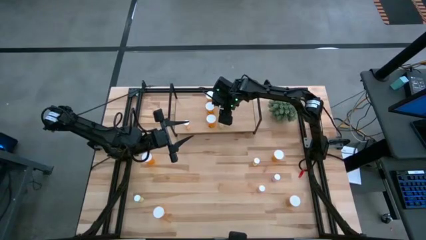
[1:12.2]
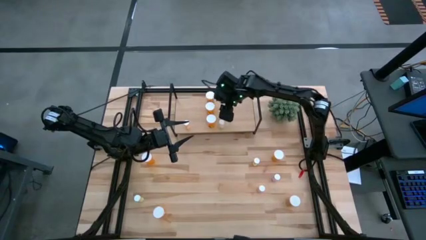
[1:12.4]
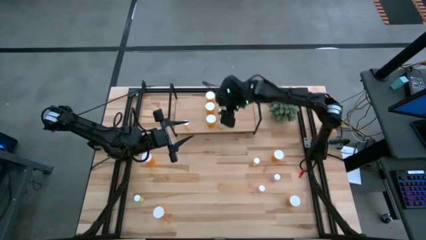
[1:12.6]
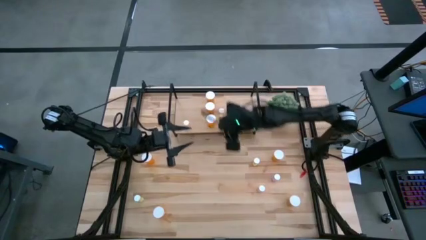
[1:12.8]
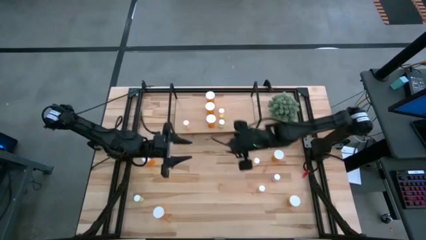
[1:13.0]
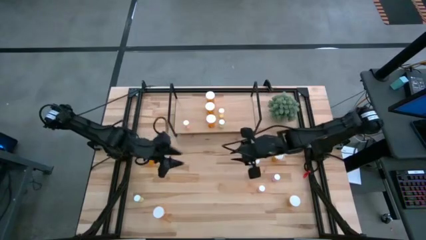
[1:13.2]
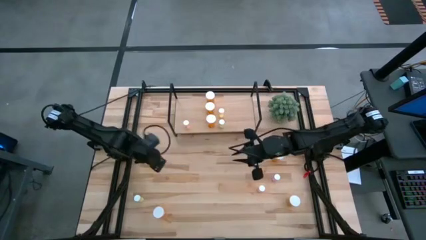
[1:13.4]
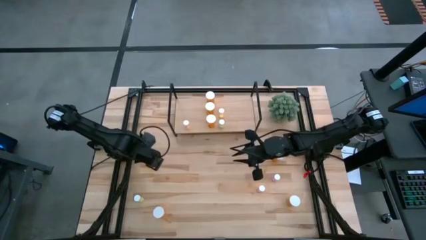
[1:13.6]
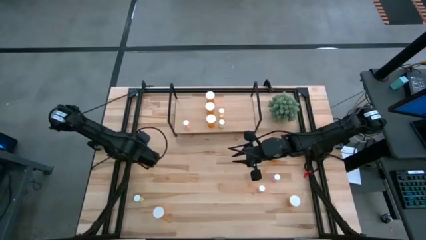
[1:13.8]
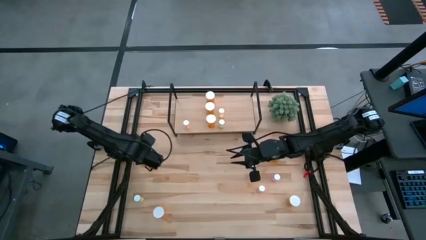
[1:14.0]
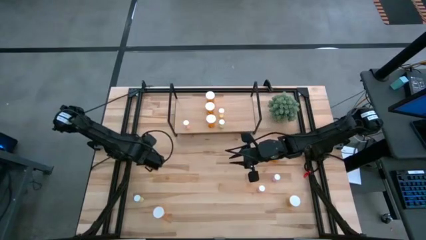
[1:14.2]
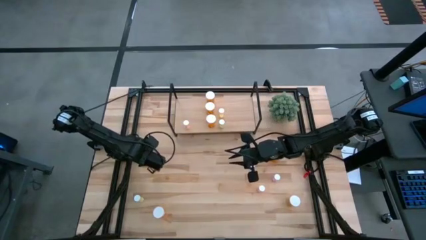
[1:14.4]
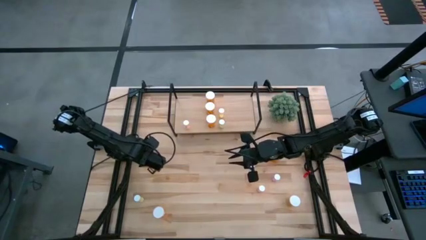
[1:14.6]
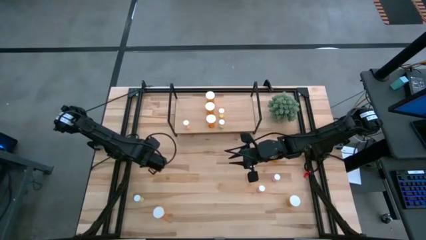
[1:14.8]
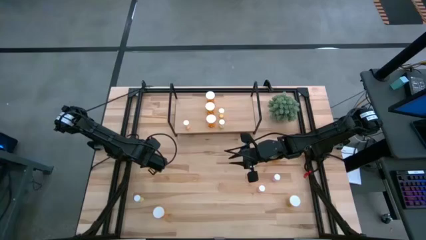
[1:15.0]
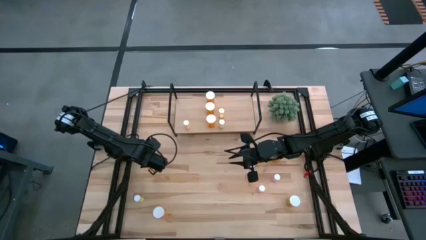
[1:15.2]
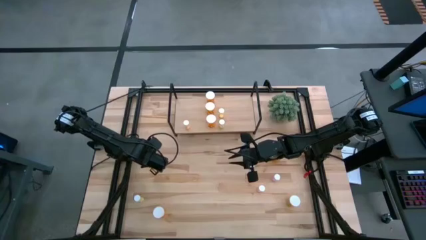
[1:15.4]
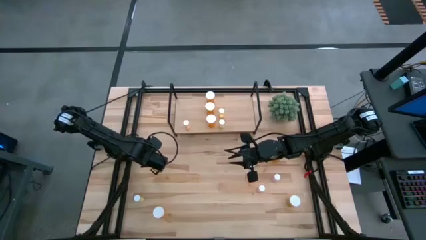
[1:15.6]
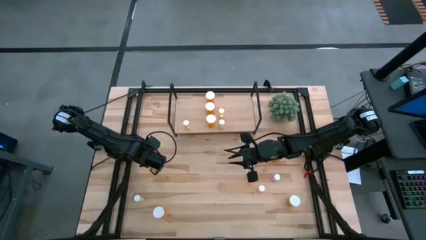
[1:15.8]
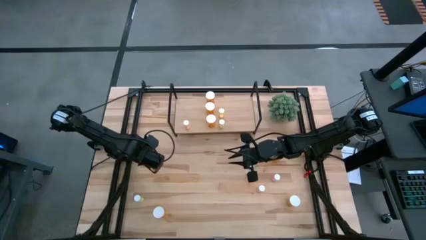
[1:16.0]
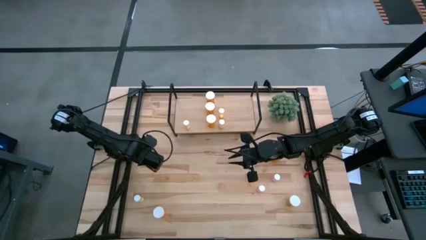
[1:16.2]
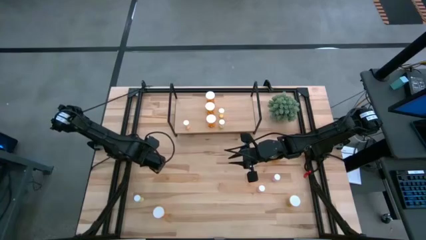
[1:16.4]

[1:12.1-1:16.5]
Task: Pick and place medicine bottles onto shelf by color
Put the large orange pill bottle on the shelf

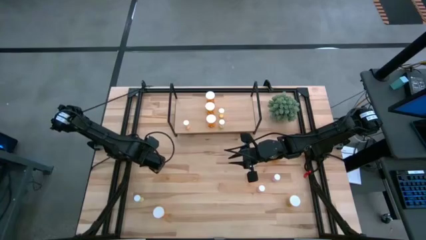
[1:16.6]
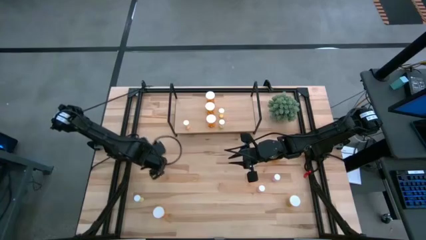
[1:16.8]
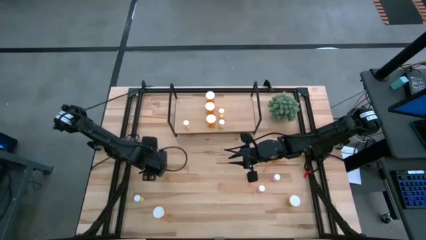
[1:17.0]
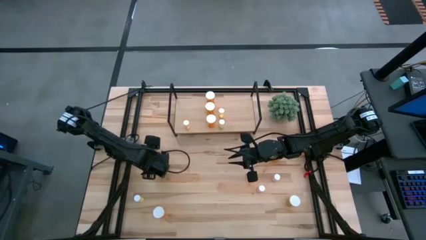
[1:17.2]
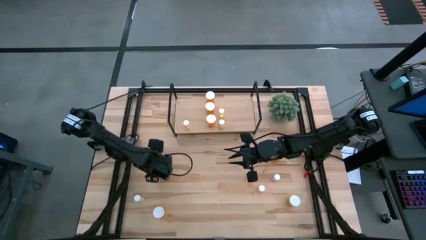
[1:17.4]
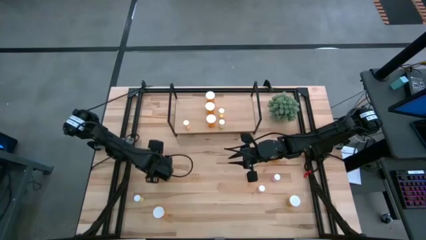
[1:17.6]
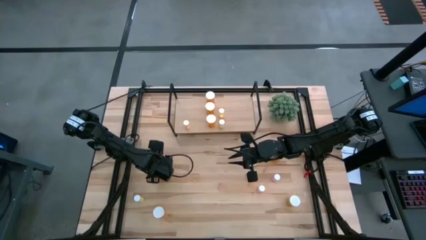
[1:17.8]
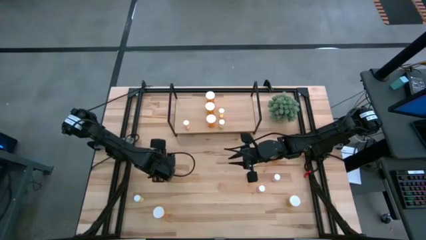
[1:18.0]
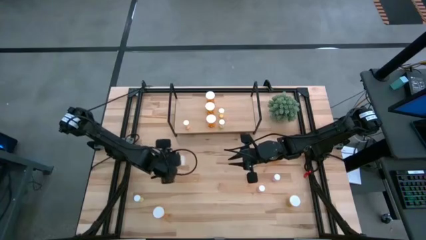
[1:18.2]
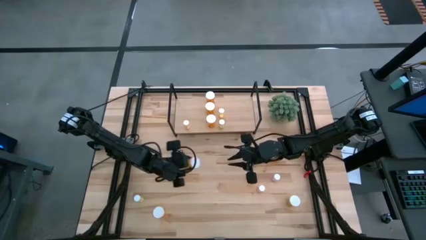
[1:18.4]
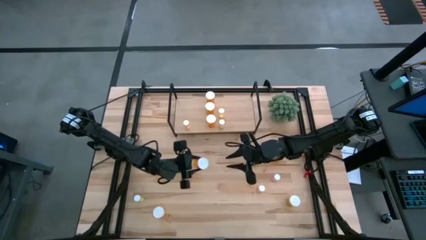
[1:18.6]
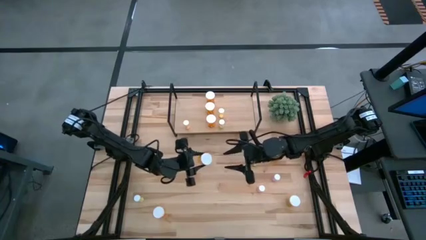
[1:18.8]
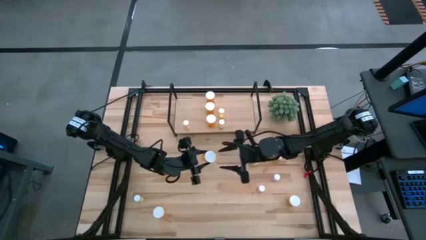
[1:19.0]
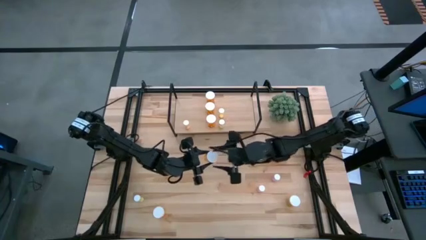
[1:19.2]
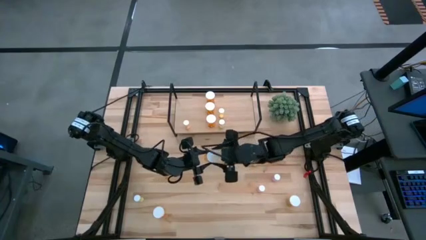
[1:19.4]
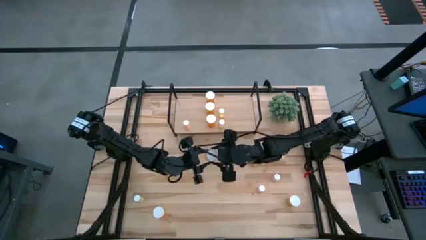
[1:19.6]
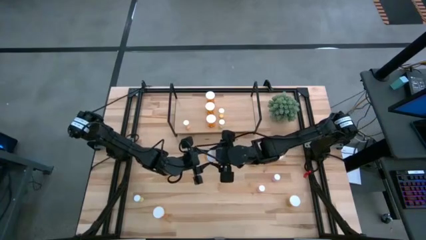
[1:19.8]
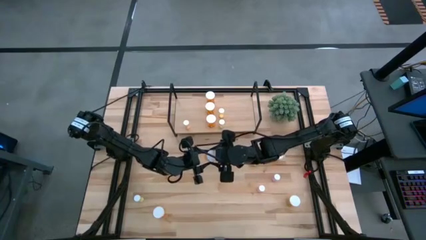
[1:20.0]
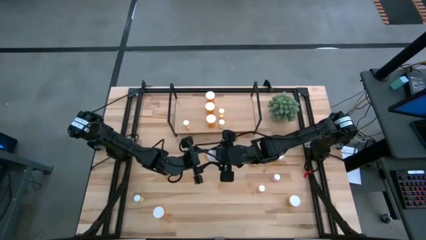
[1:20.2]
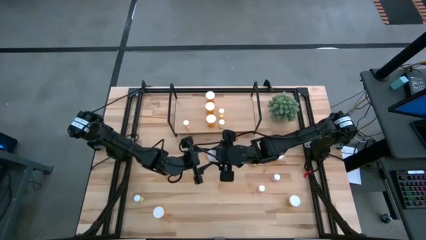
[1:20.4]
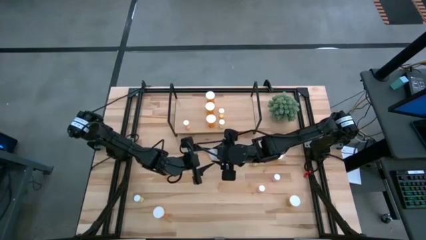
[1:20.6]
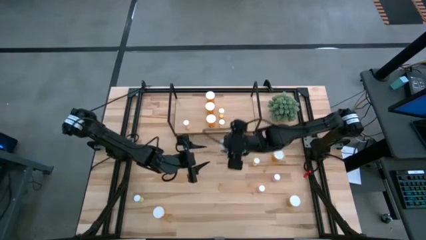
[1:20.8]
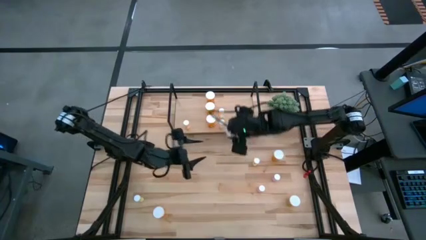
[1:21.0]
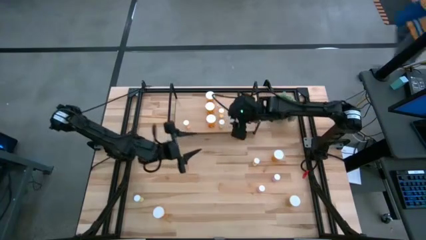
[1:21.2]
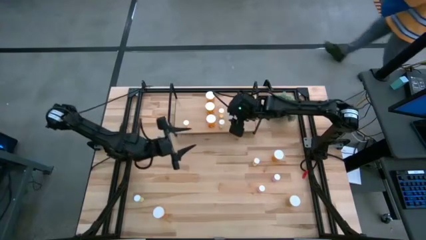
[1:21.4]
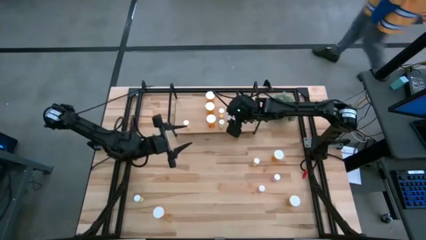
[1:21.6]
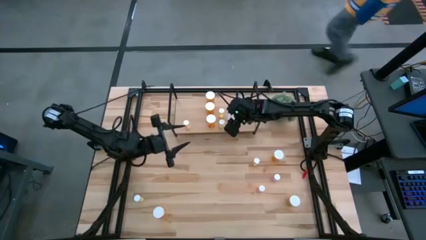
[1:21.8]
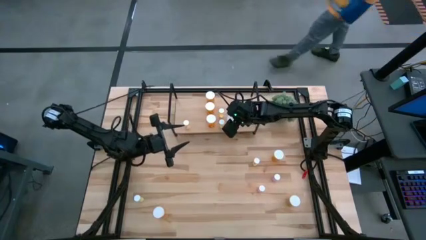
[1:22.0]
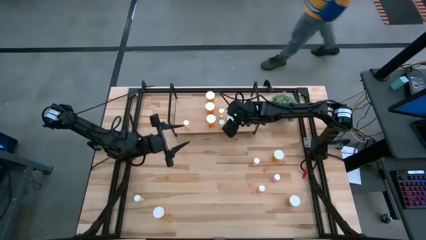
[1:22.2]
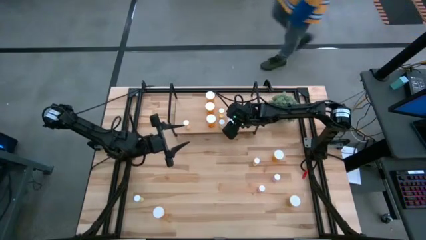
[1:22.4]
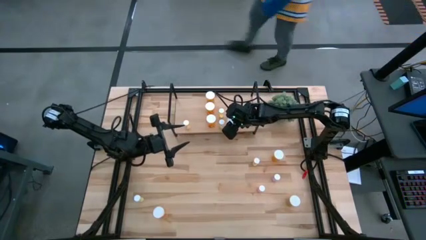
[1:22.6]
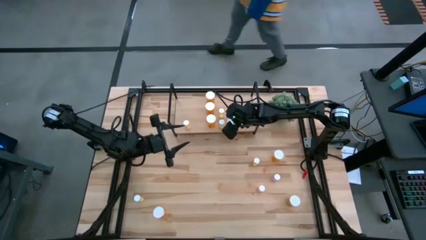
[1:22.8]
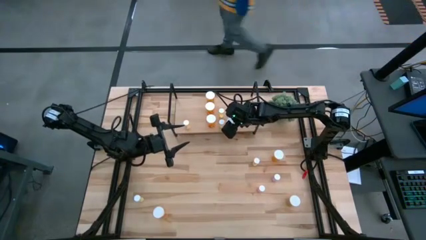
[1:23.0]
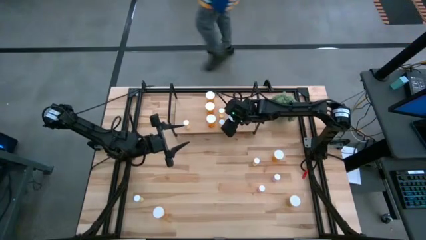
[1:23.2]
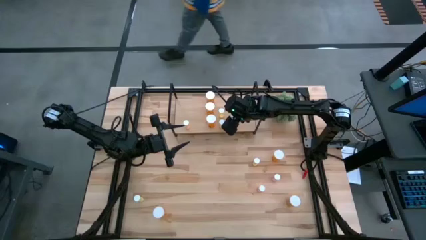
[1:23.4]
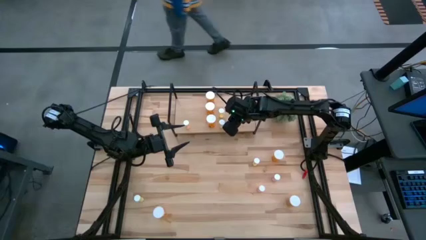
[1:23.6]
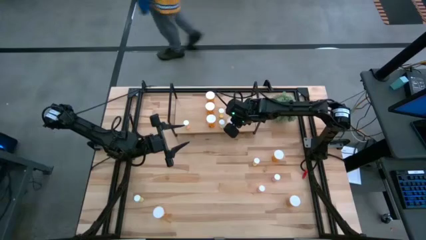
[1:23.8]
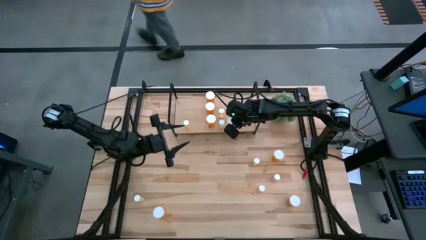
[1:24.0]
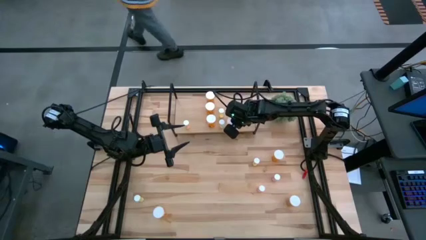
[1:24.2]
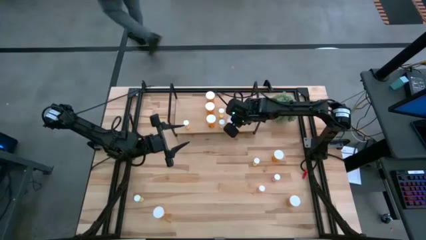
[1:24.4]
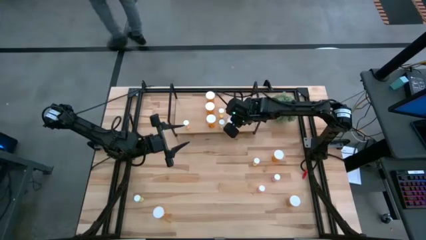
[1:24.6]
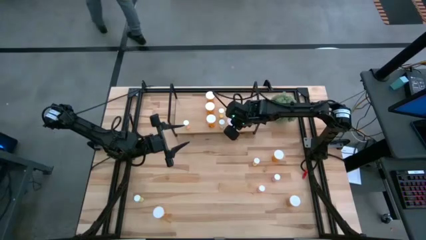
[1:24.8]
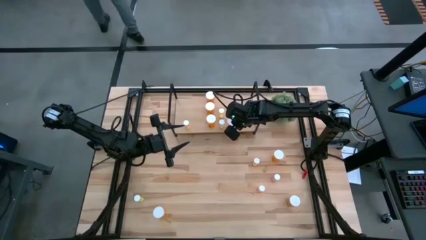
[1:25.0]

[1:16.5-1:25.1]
Put the large orange pill bottle on the shelf

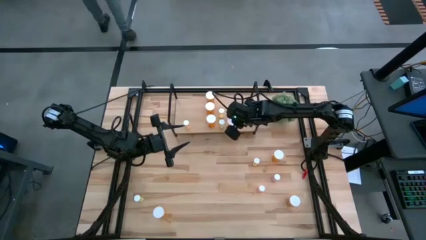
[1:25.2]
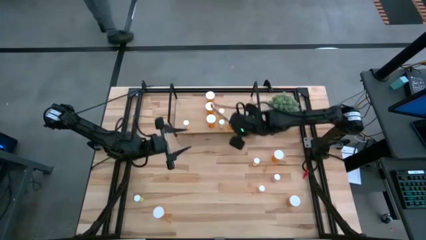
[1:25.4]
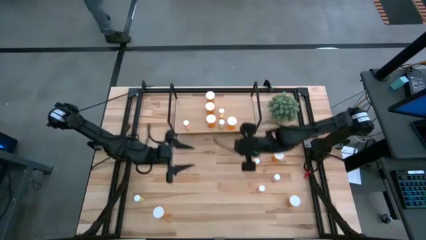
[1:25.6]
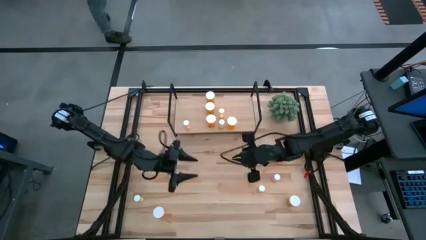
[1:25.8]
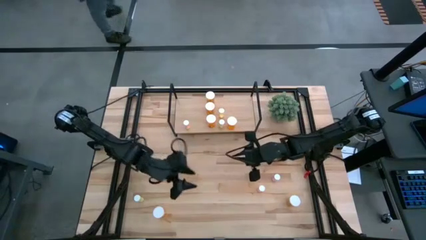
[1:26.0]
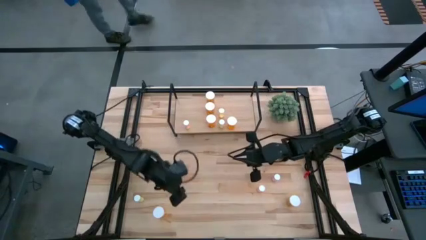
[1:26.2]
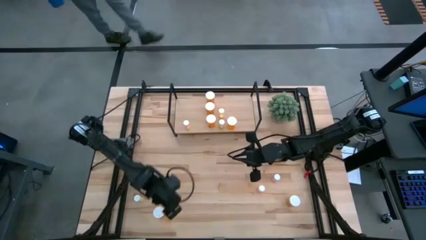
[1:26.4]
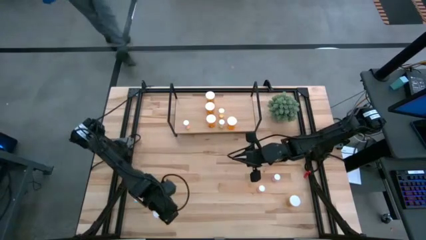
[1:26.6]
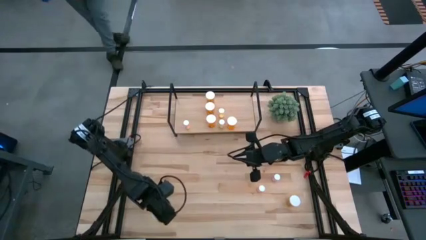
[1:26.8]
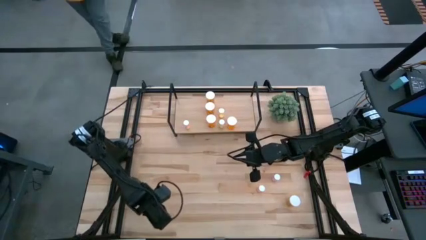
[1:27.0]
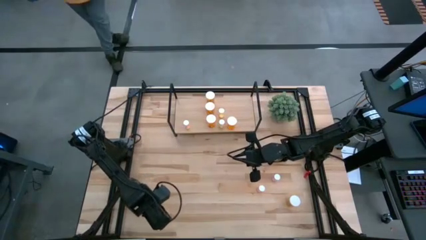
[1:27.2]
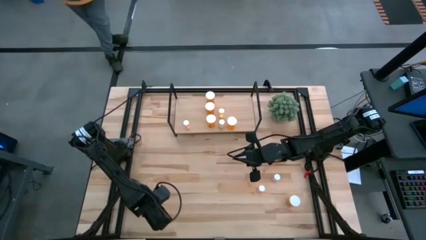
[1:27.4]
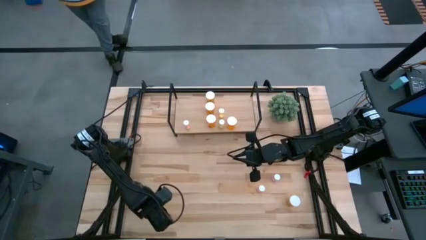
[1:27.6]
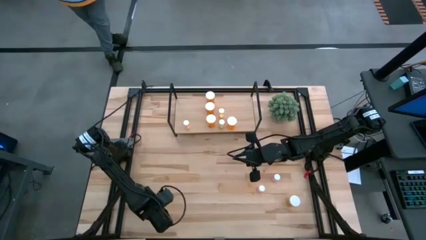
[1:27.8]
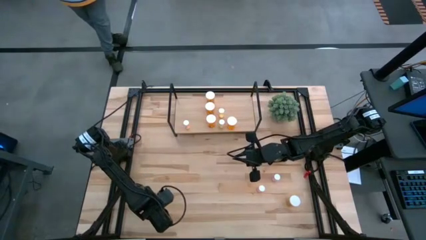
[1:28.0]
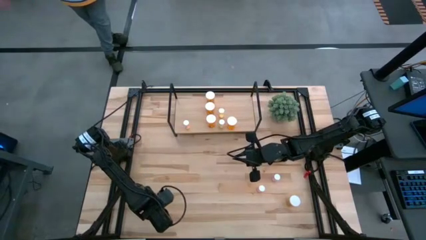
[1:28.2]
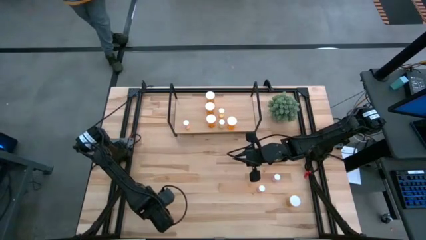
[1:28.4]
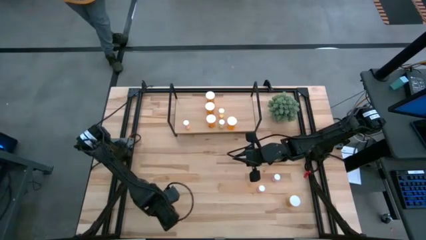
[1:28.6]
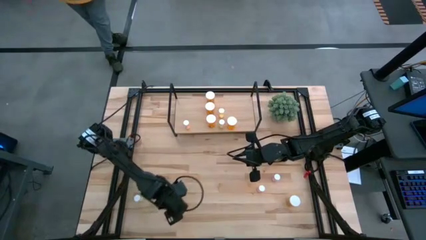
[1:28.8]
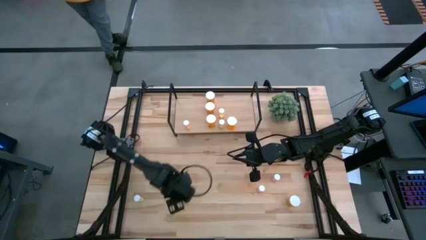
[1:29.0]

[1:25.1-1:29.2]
Put the large orange pill bottle on the shelf aligned with the other large orange pill bottle

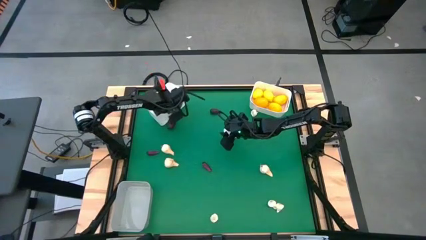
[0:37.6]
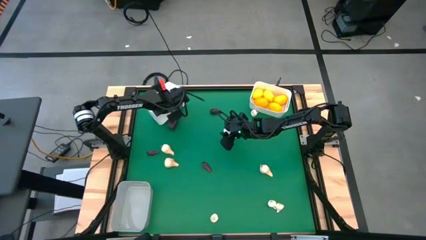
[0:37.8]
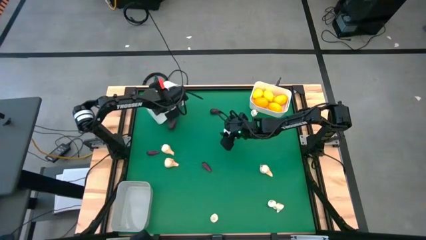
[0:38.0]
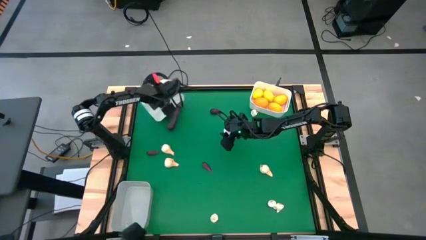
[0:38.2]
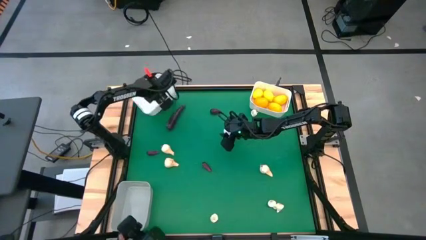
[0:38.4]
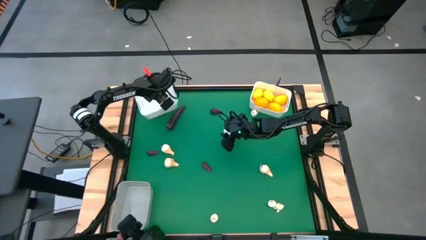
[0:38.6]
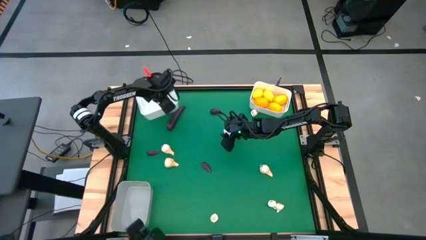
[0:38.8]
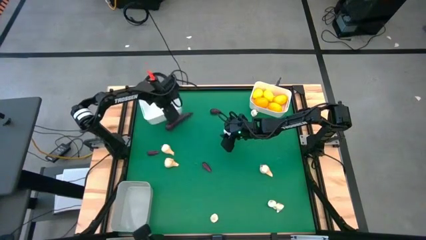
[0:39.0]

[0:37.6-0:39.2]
Task: Sort produce into baskets
Adjust the position of the left white bin
